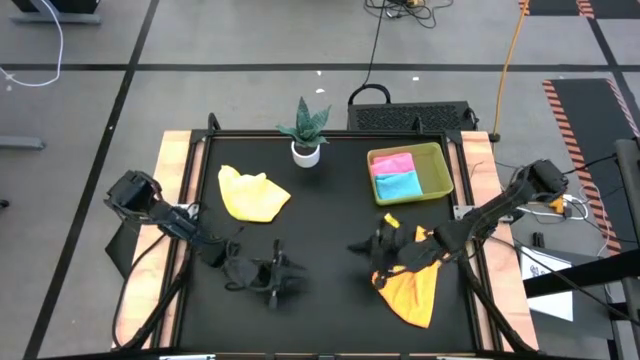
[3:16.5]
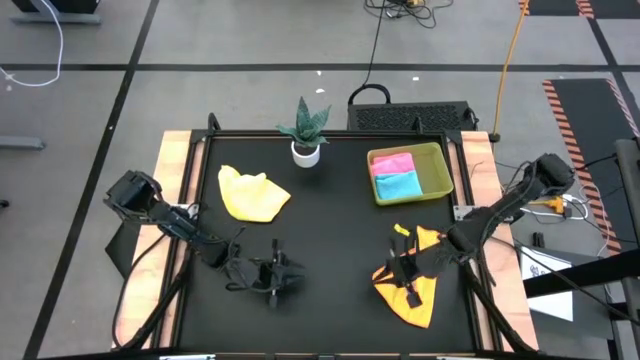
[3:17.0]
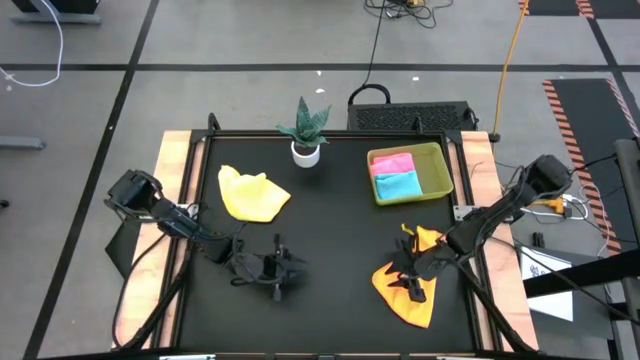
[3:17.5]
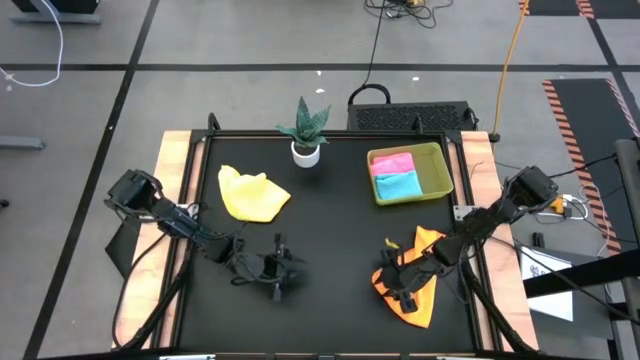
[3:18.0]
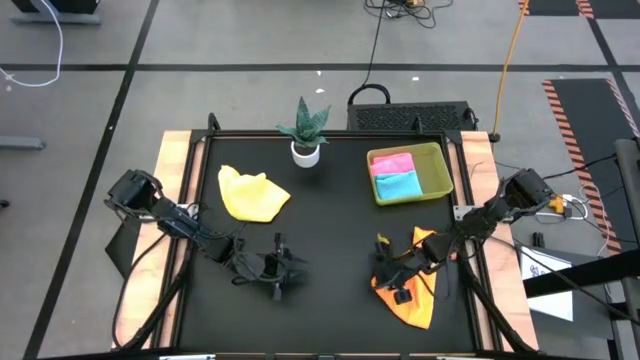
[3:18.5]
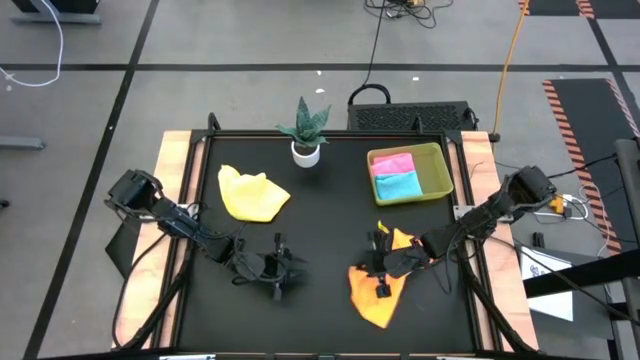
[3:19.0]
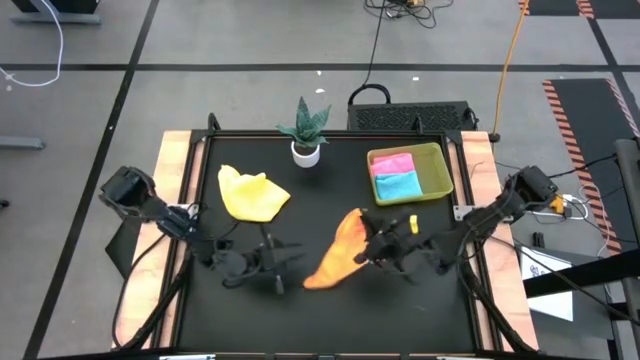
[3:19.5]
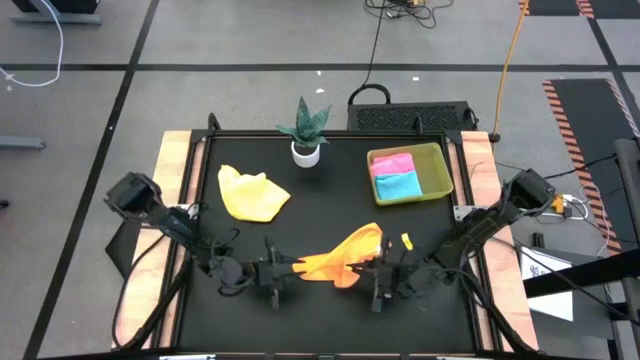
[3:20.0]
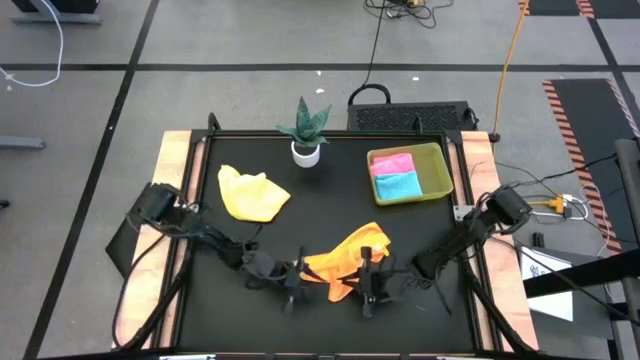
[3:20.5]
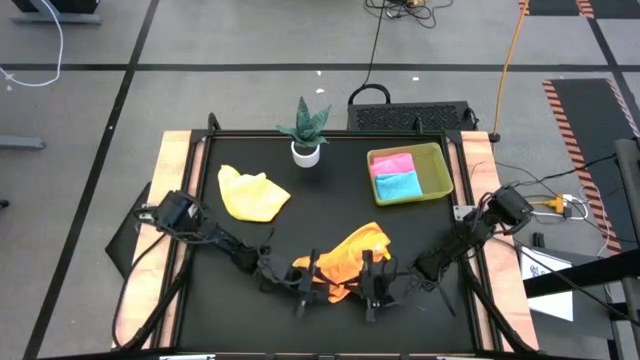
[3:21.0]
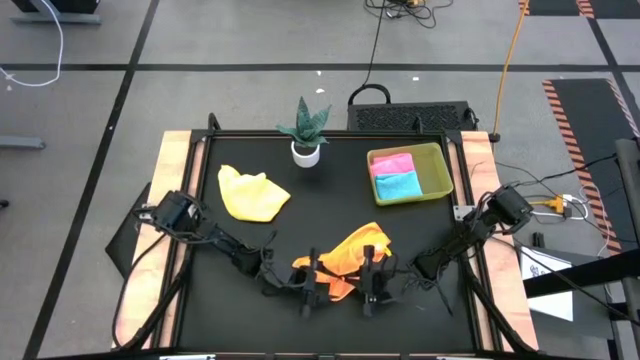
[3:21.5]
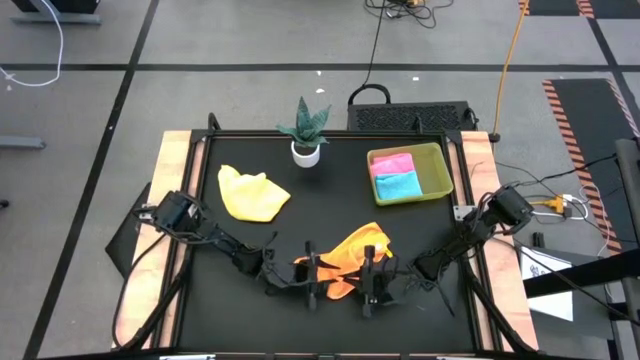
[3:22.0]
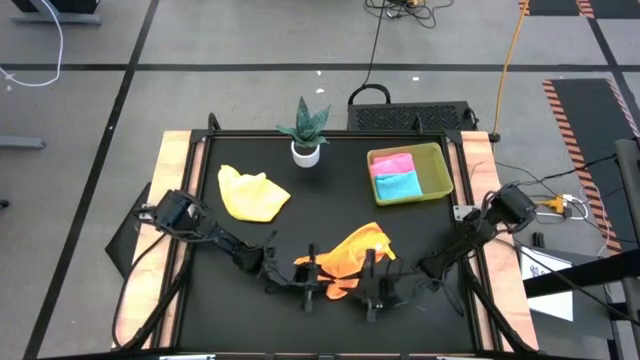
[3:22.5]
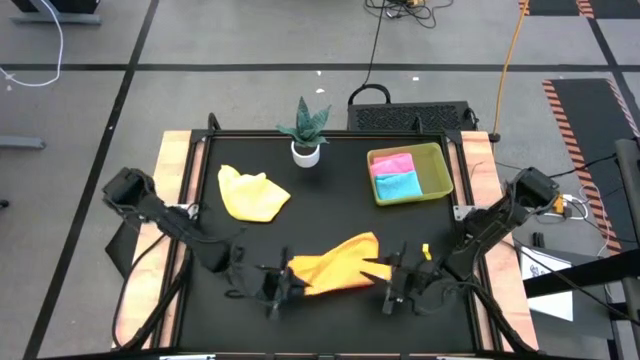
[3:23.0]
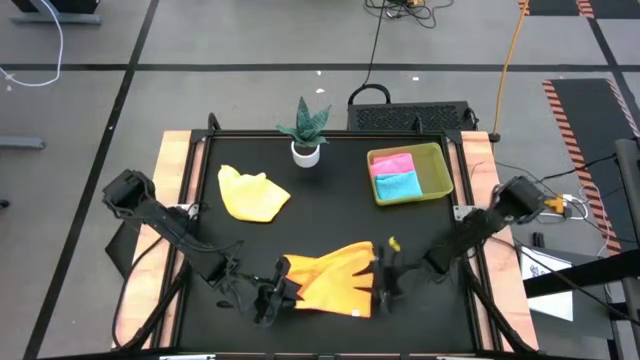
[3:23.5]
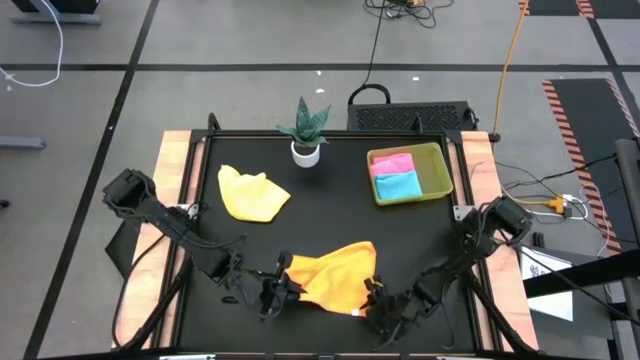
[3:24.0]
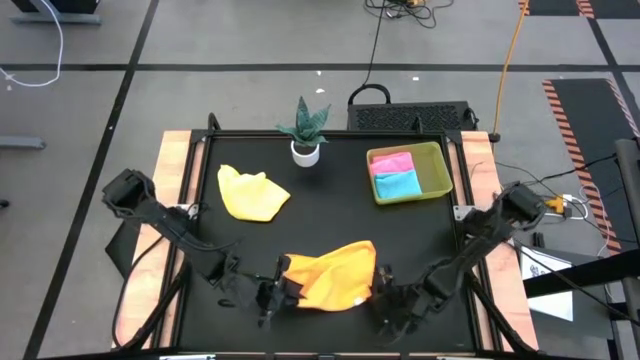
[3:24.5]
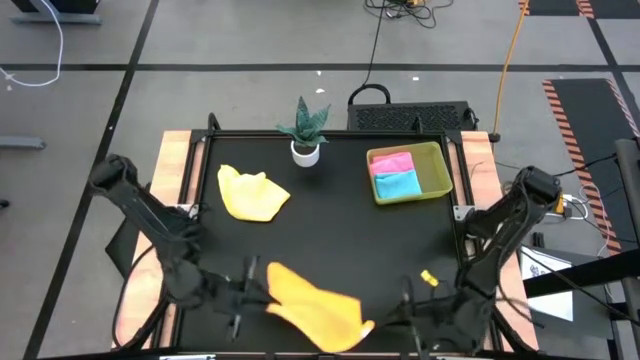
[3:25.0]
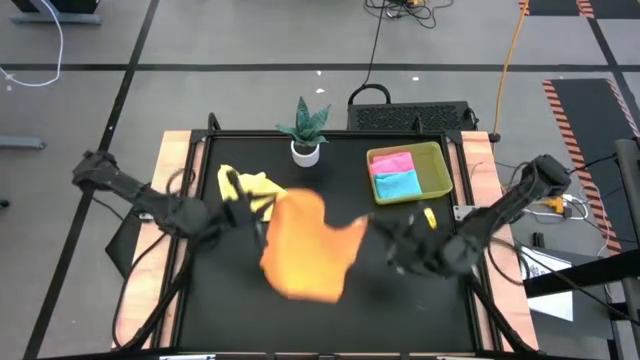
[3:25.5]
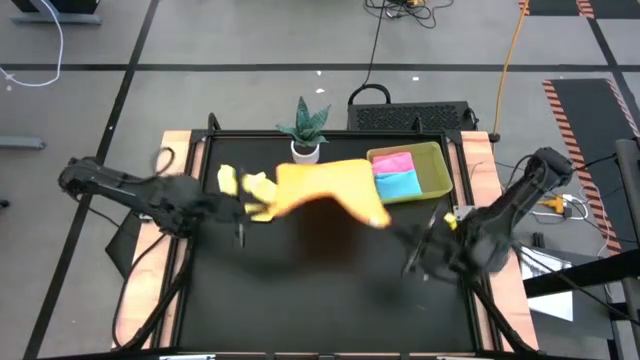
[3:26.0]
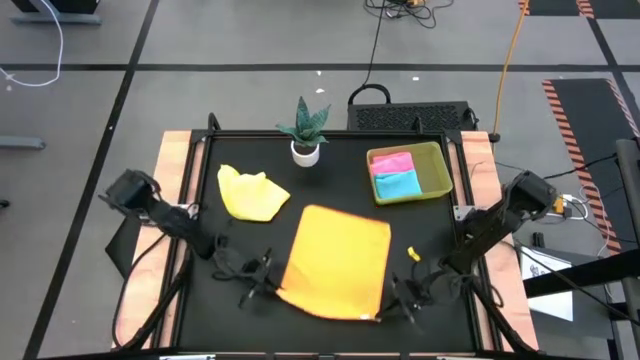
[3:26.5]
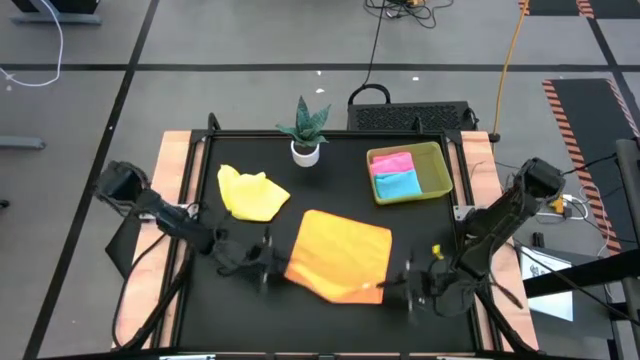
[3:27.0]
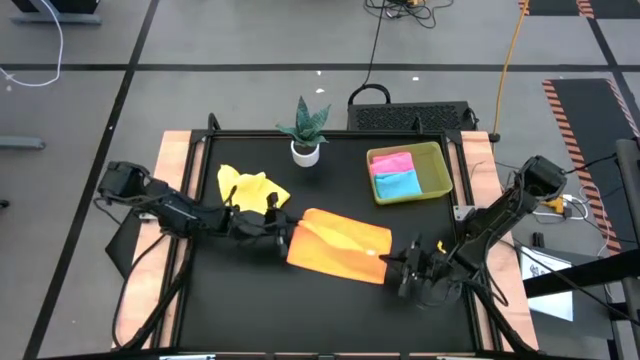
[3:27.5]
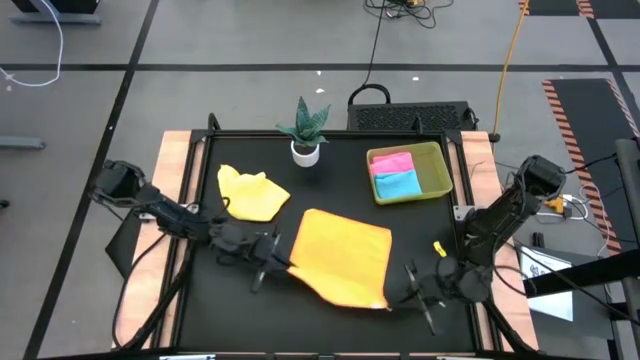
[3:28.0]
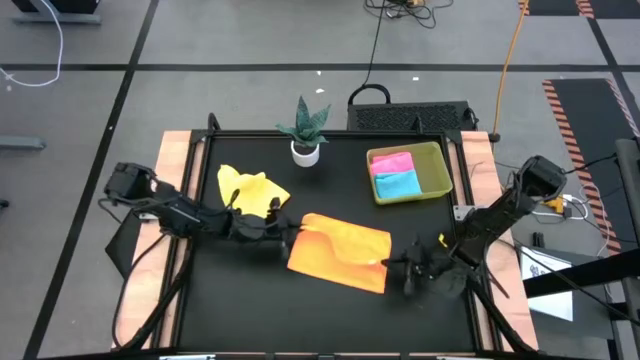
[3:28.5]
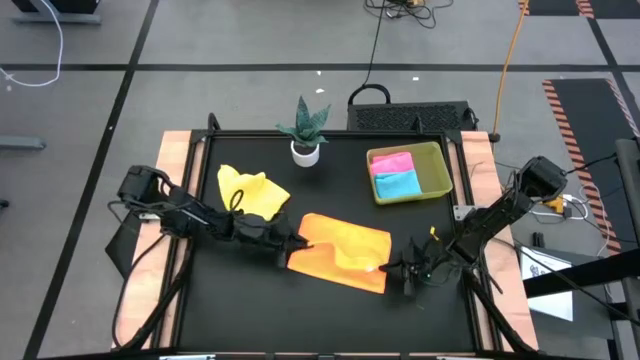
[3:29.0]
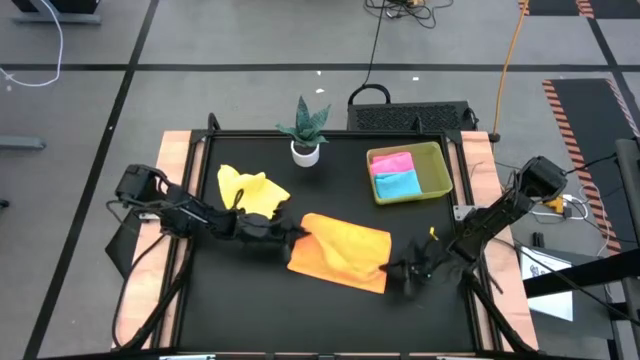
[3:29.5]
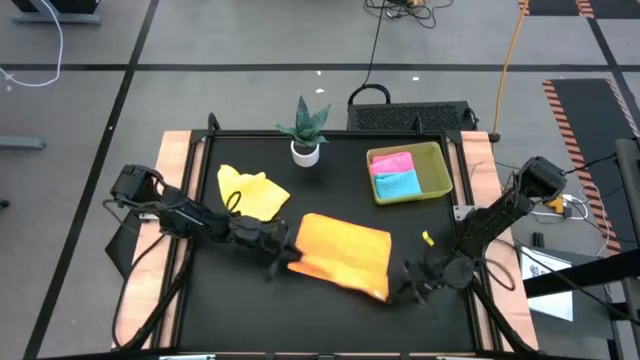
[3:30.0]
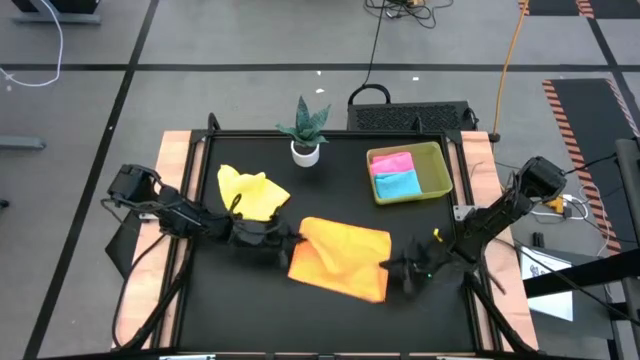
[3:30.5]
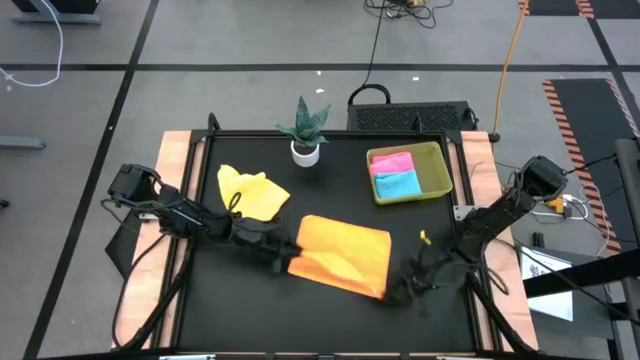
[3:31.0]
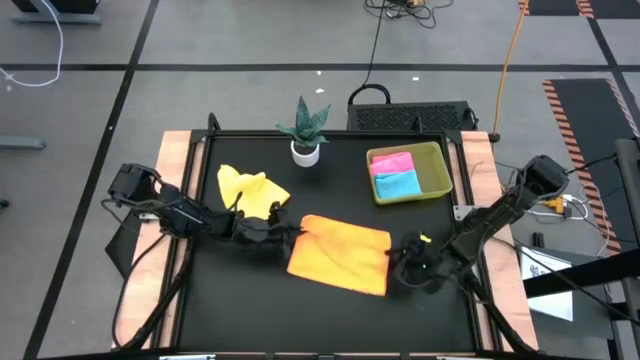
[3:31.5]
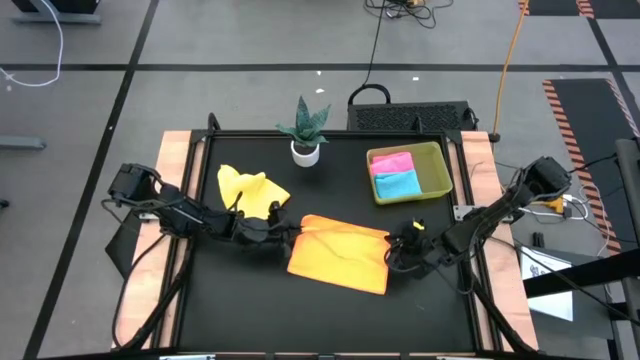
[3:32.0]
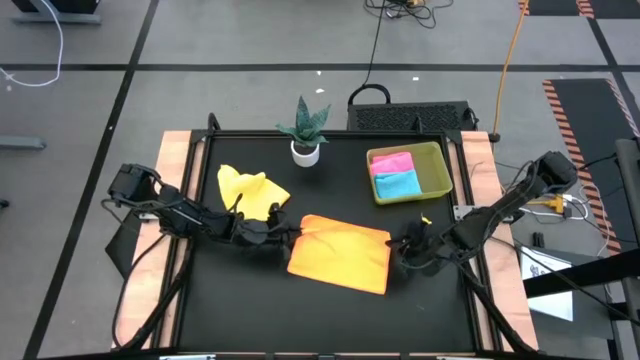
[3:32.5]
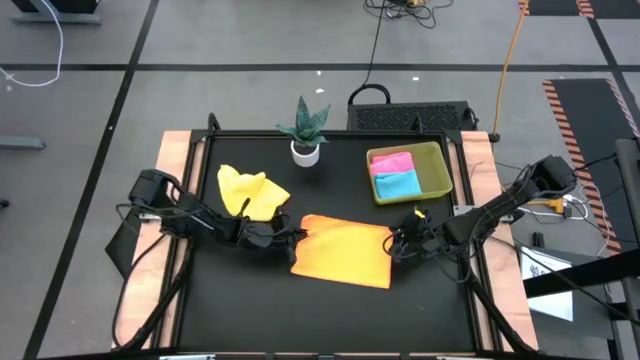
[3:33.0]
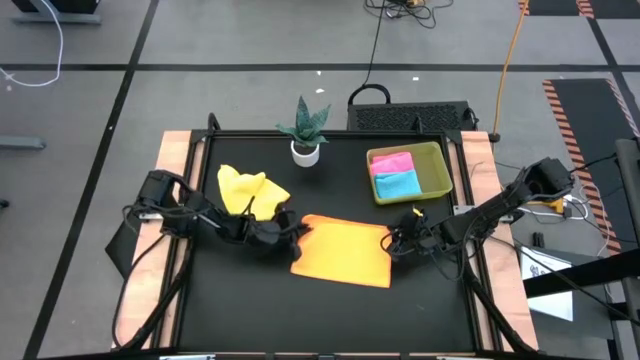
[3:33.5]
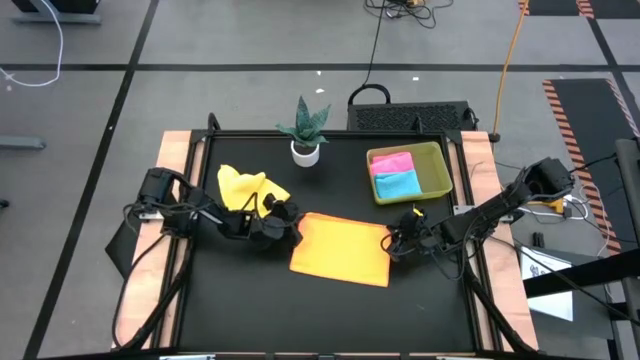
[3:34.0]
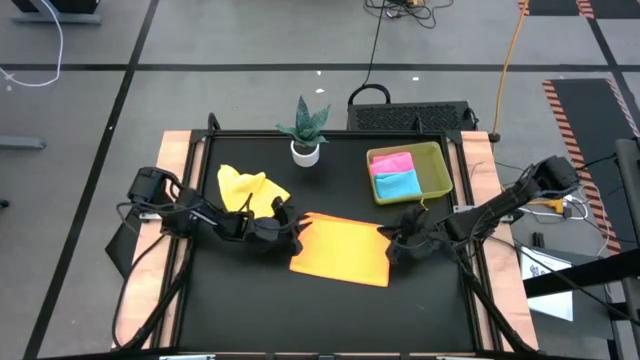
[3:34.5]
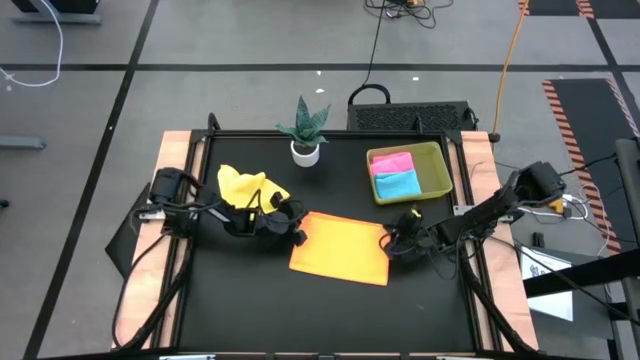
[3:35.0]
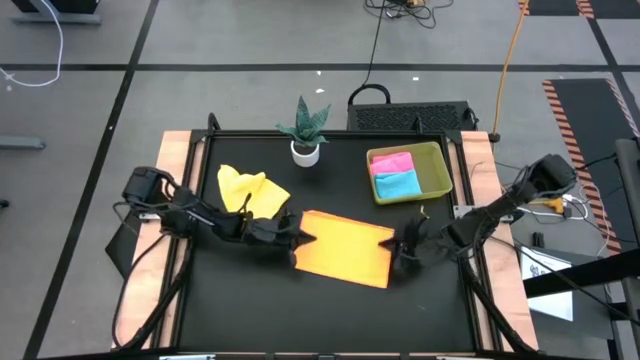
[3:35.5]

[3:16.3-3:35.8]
Task: Fold microfiber towels
Fold the orange microfiber cloth

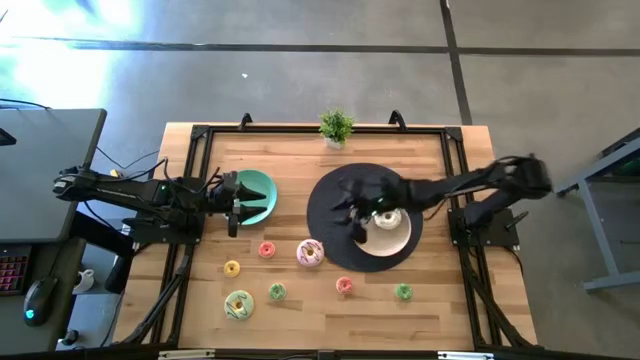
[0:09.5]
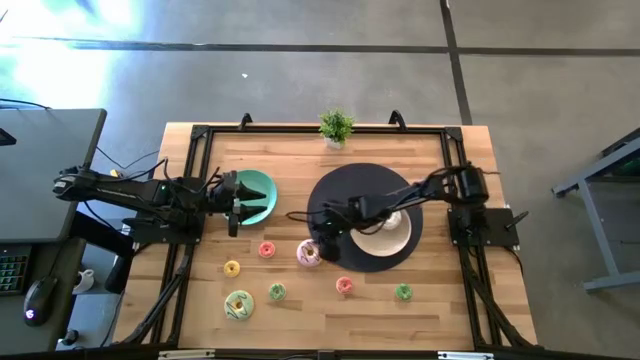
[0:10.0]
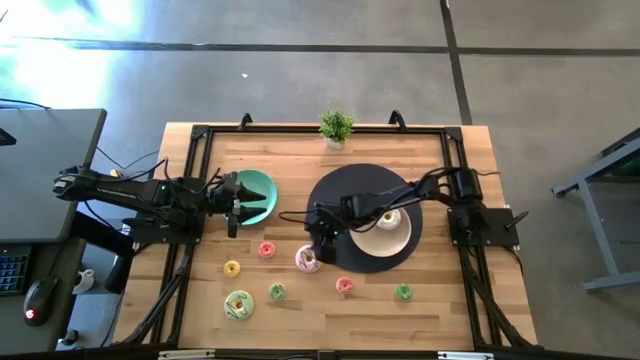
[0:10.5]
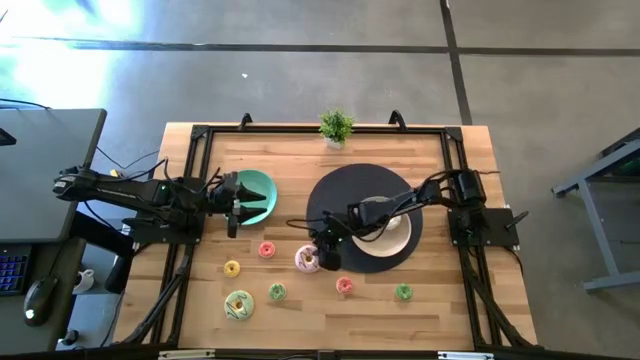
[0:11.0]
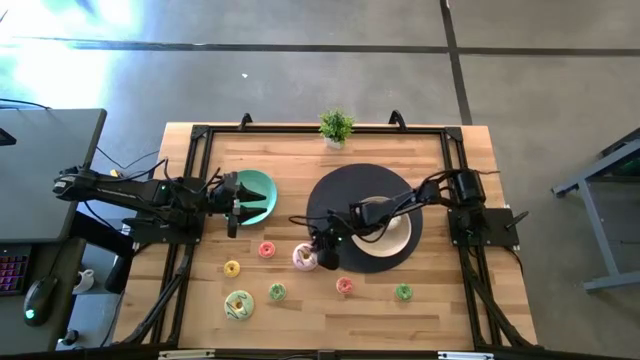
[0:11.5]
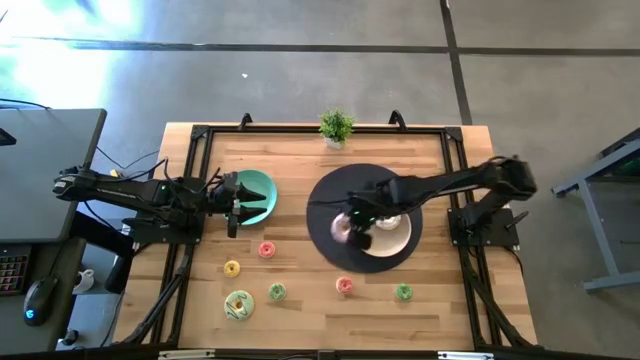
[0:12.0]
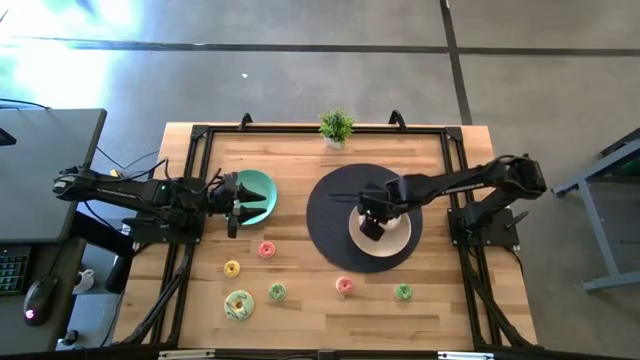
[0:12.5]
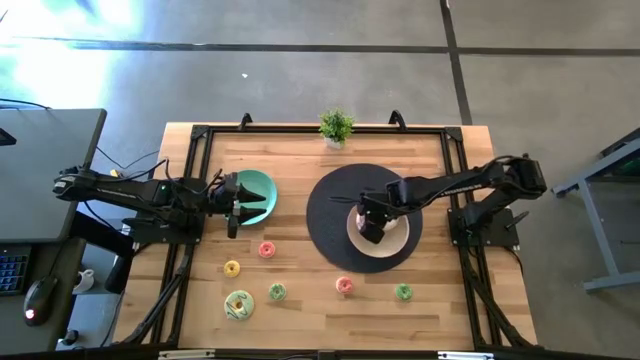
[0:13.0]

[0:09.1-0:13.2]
Task: Pick & Place donuts
Put the large purple donut on the white plate
